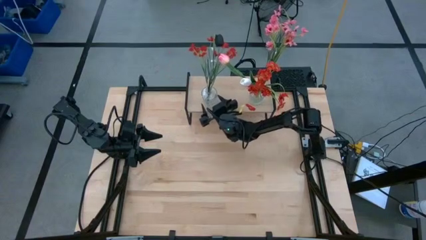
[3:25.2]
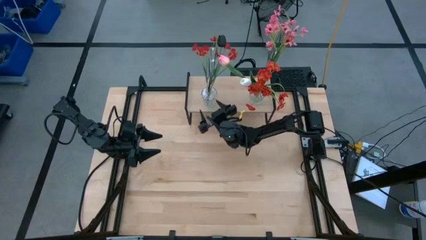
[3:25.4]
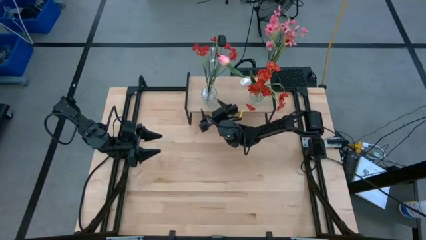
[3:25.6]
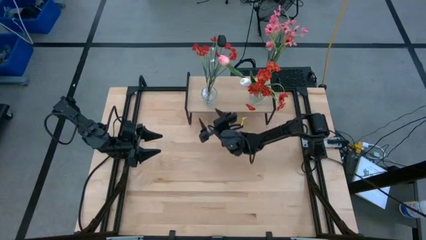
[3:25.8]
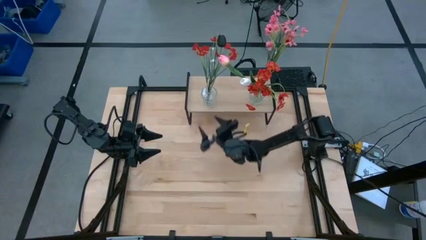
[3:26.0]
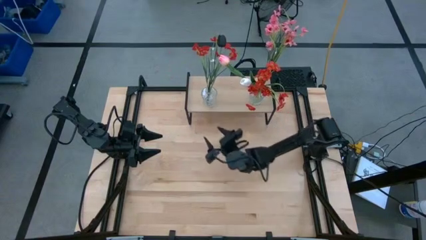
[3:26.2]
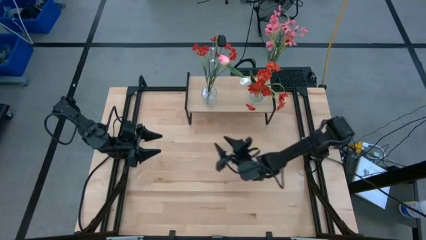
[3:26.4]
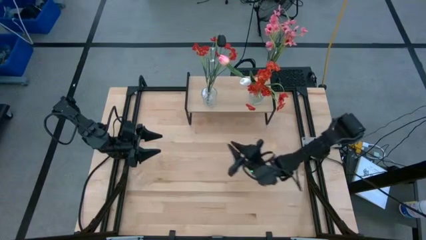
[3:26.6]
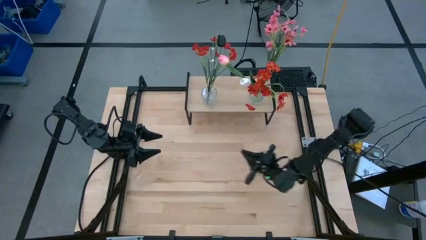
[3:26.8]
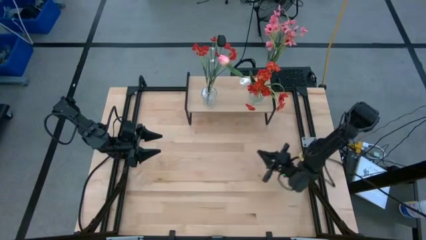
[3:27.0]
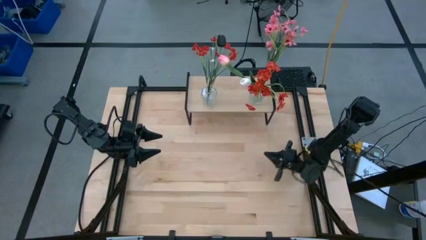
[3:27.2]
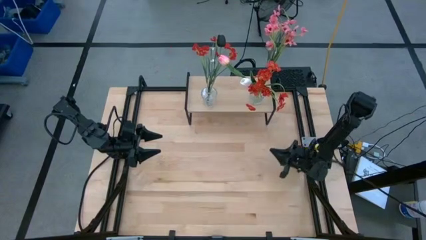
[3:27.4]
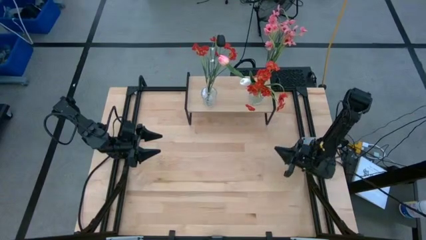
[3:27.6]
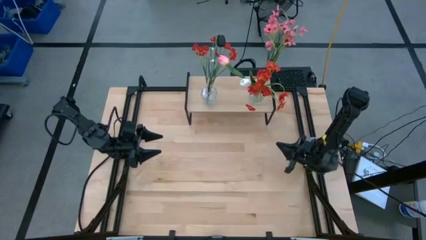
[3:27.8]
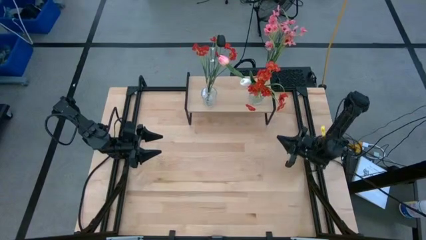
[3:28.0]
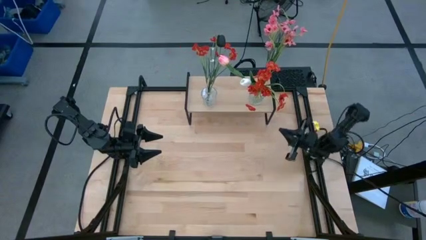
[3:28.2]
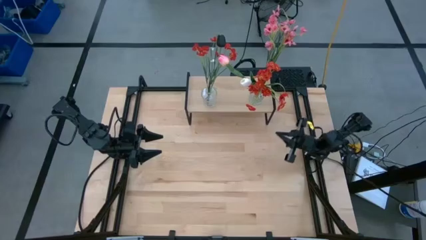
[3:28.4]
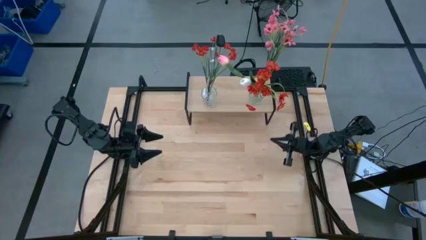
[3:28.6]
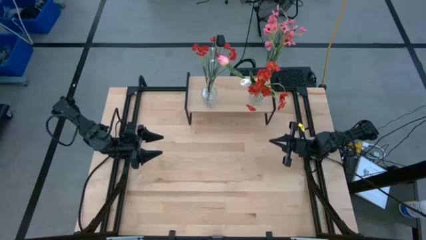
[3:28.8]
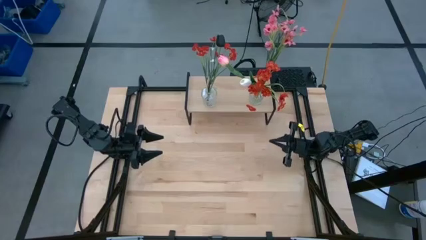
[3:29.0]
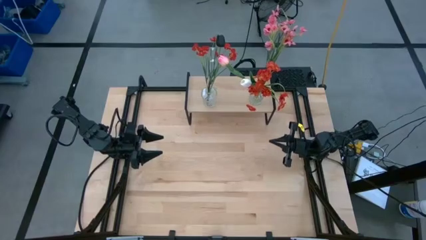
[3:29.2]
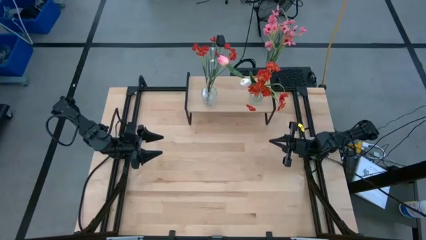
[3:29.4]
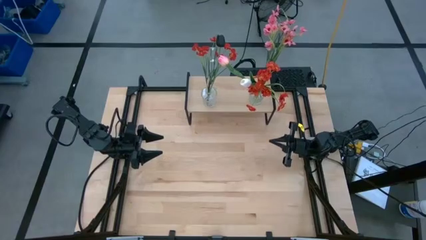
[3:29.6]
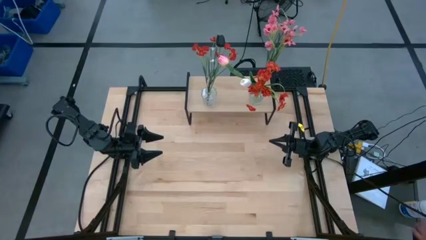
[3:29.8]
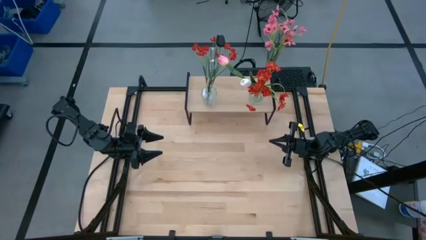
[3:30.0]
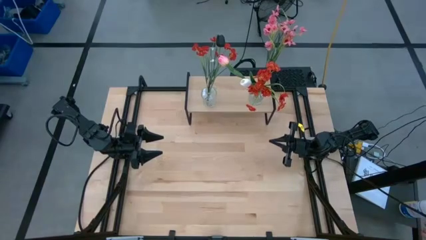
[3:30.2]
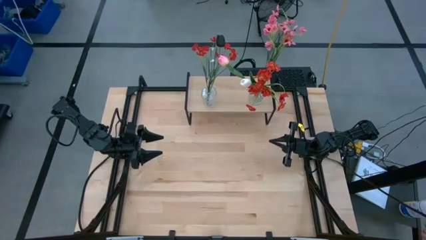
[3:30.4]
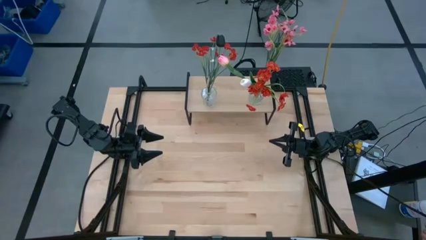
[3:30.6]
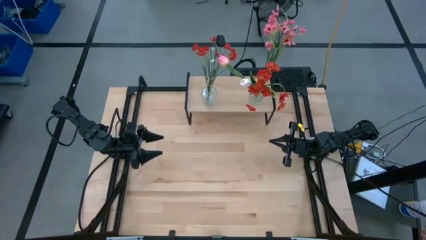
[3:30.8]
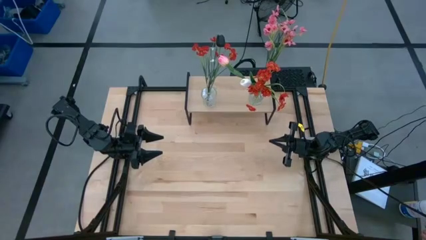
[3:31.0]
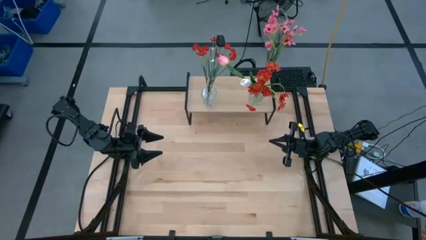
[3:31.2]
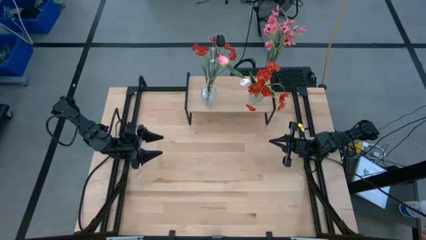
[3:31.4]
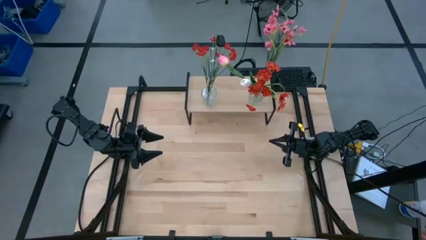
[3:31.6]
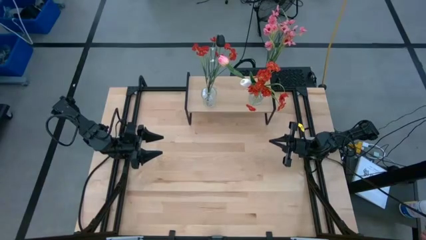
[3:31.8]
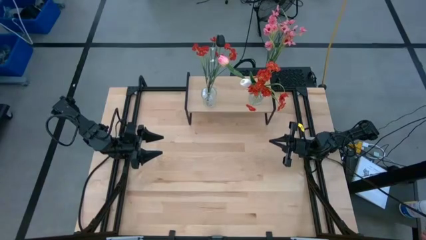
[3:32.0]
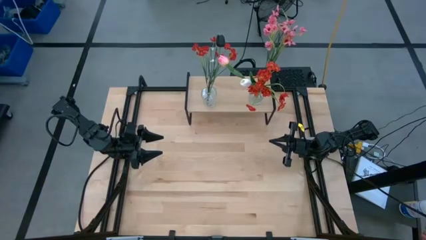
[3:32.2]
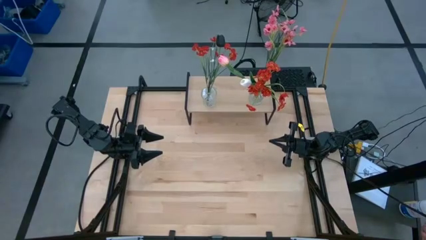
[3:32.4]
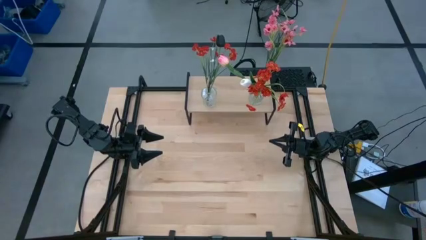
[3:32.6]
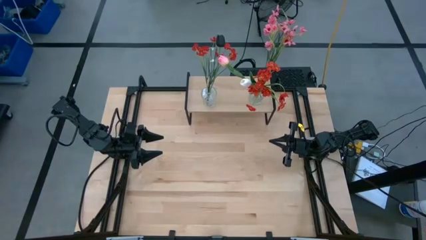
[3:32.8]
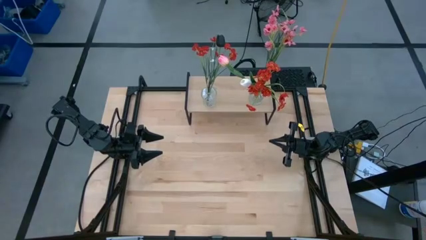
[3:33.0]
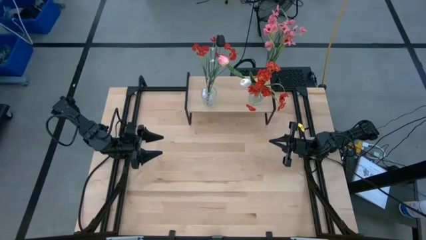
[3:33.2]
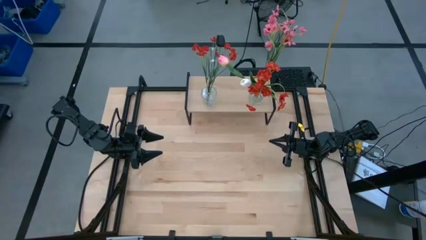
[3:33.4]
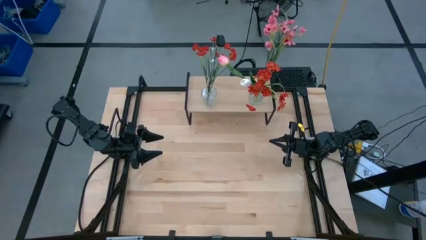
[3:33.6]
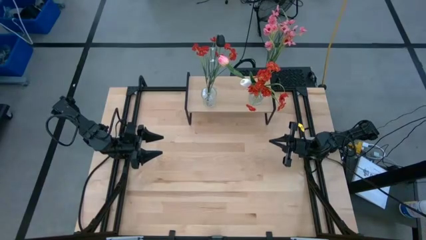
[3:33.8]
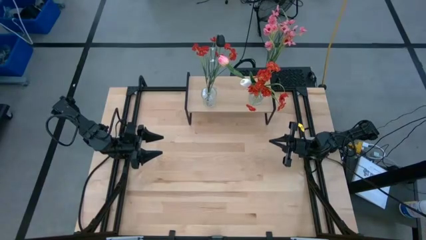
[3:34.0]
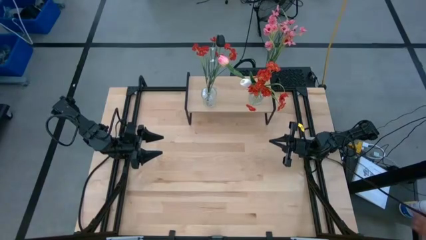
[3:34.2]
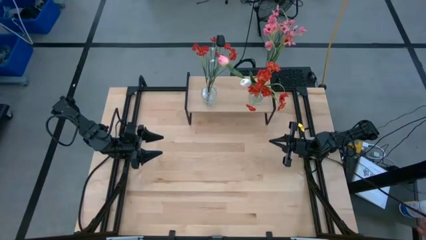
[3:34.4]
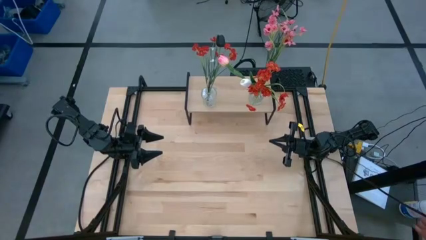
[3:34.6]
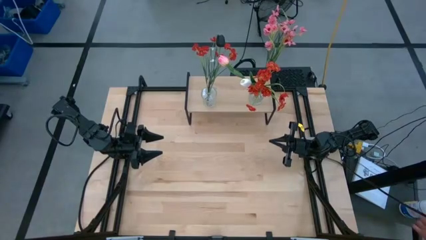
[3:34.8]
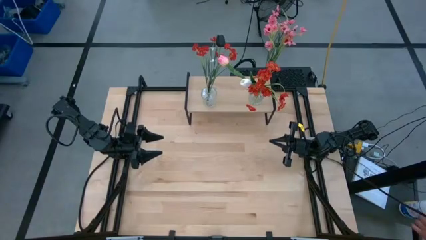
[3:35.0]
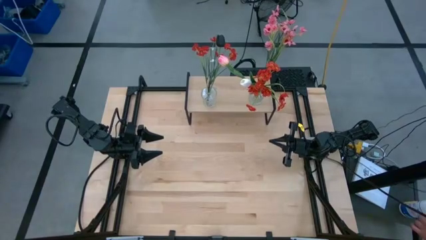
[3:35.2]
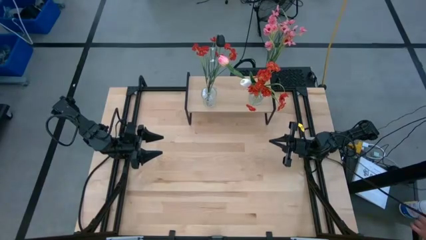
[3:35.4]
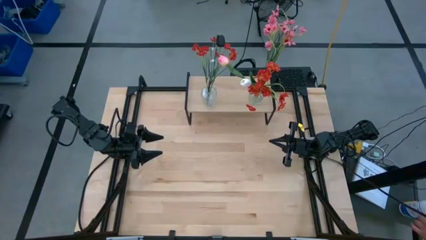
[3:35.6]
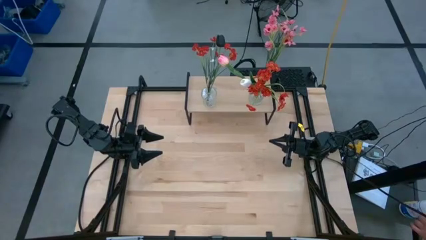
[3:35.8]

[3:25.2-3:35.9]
Task: Pick and place flowers into a vace then onto a shelf
Return to Home Position

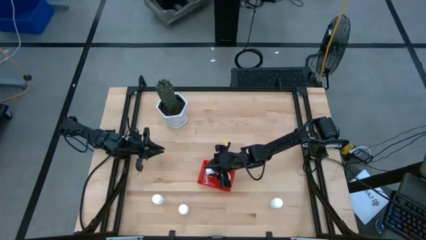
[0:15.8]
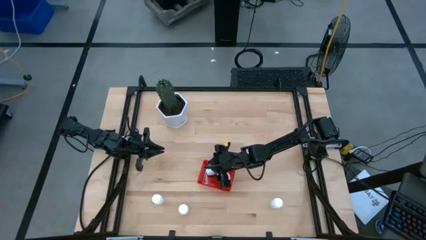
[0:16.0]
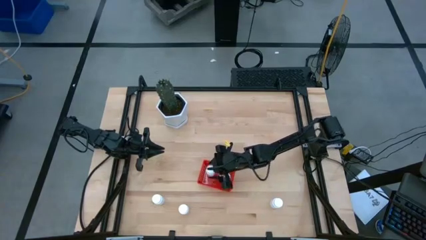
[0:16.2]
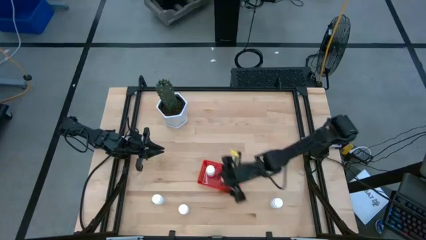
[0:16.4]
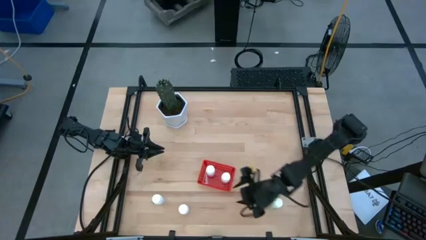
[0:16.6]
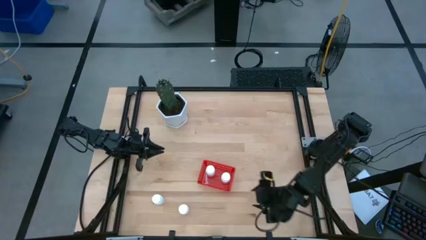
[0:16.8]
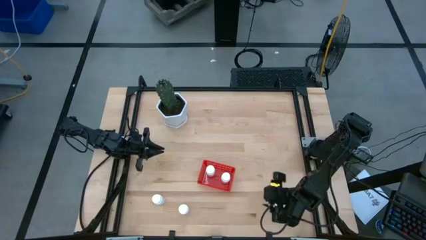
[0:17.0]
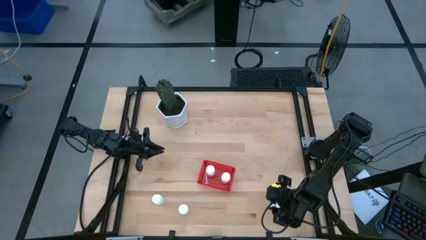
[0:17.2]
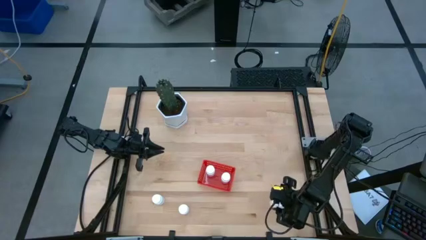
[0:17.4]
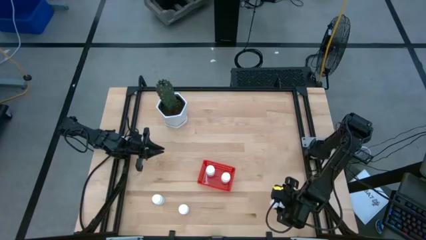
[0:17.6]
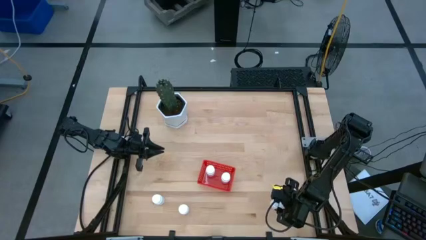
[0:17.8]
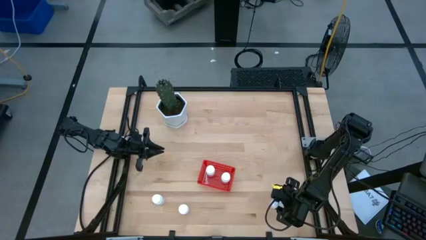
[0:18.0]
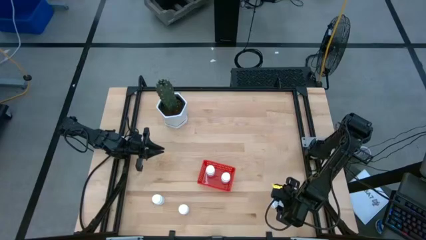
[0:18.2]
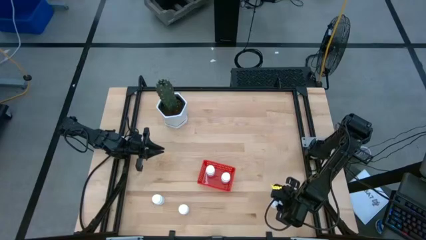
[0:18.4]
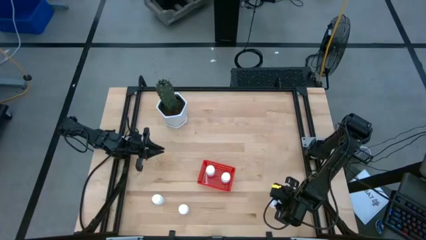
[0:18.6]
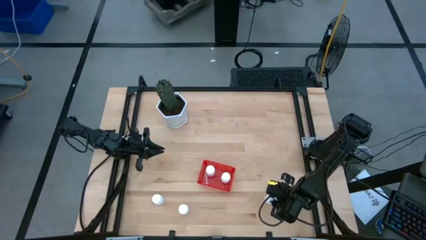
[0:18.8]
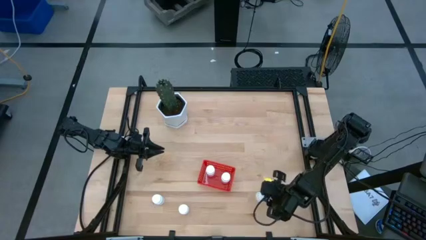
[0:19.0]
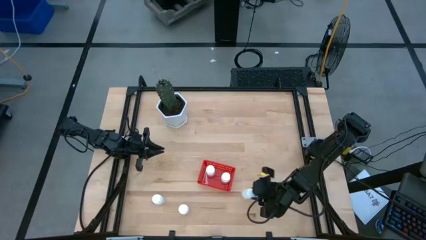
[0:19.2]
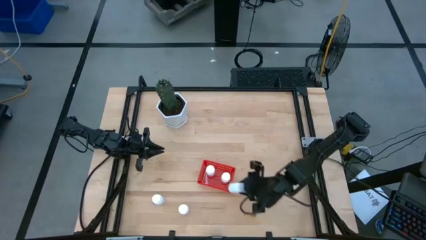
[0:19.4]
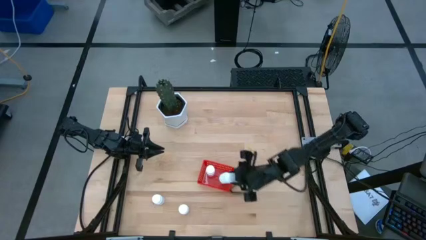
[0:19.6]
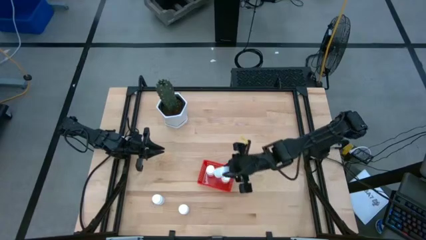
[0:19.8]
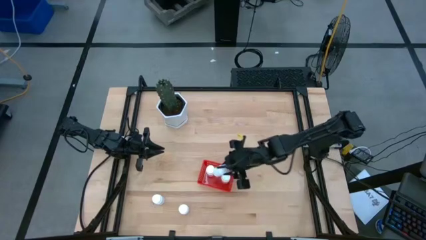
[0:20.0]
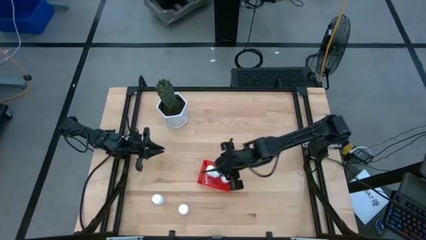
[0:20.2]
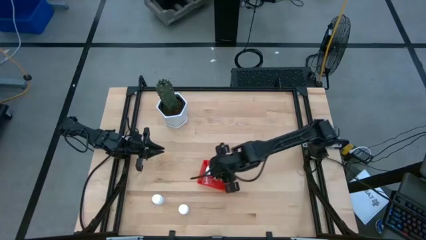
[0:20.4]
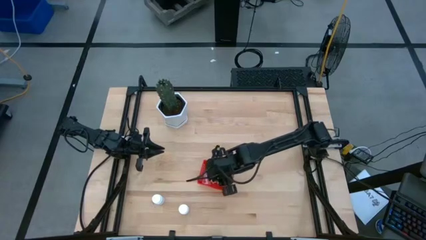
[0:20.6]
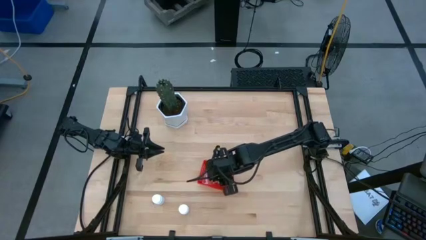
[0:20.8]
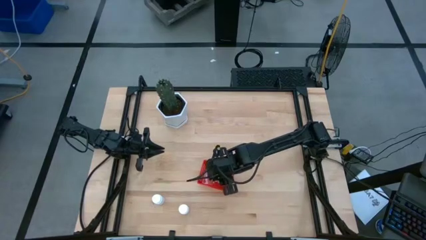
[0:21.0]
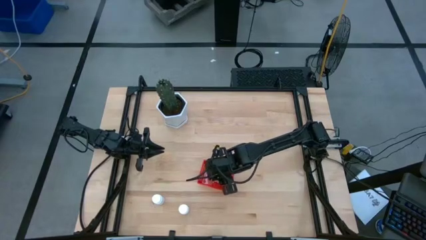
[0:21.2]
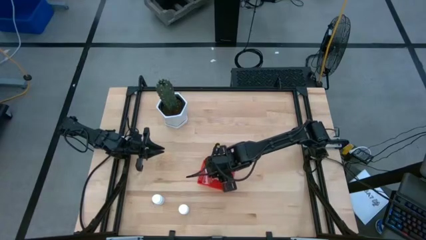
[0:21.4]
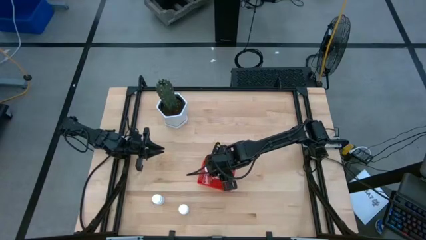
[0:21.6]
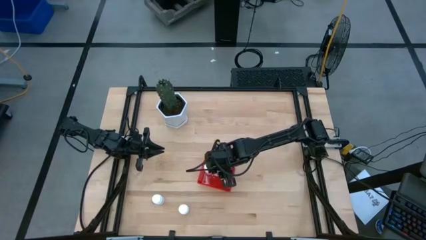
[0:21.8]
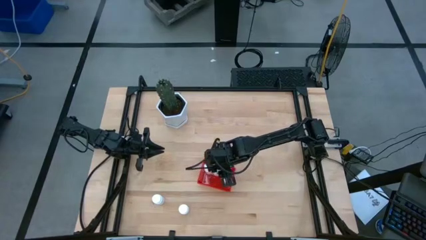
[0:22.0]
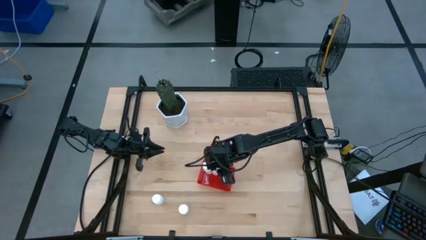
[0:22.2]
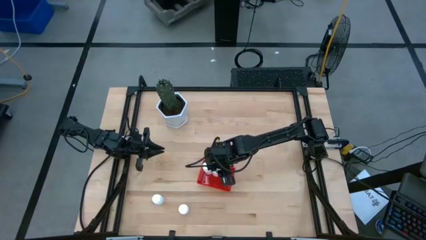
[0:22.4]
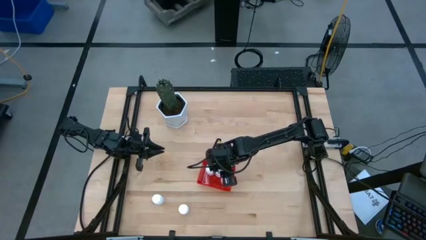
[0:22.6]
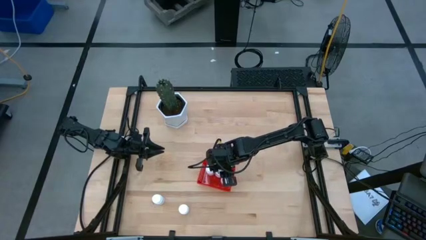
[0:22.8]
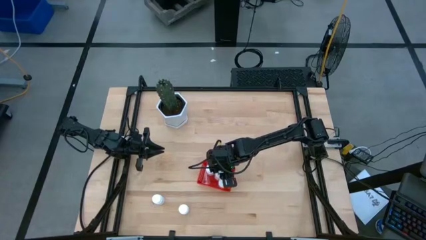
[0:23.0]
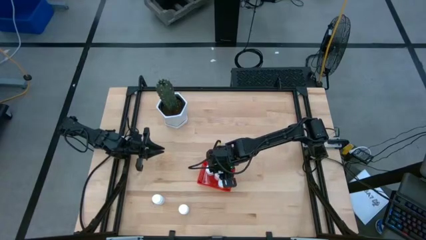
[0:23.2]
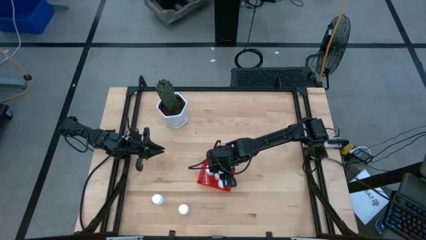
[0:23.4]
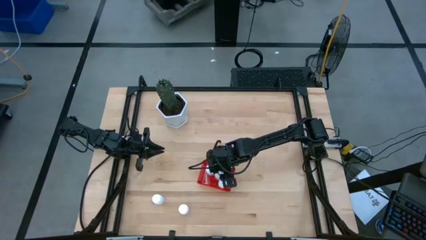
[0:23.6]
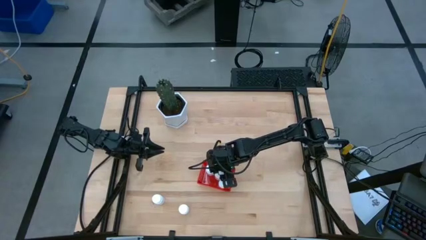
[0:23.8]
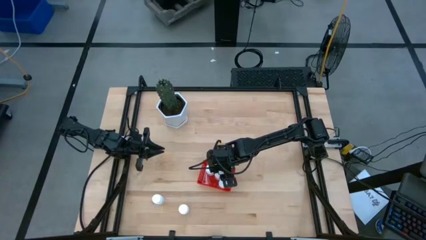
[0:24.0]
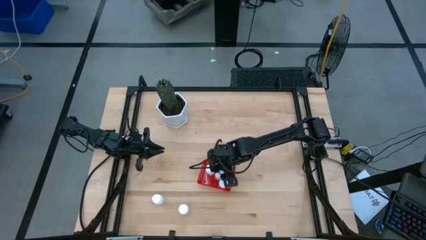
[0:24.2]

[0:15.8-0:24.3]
Task: Pick and place pill bottles into a basket
Put the white pill bottle into the red bin
